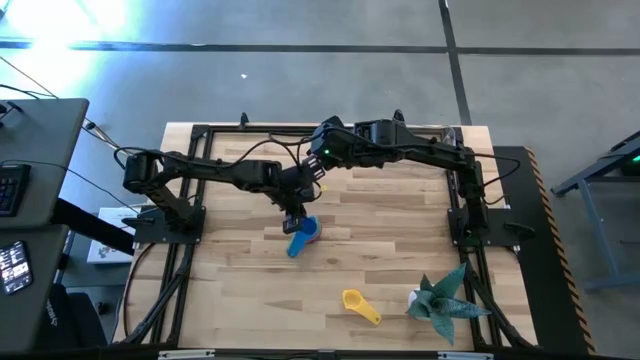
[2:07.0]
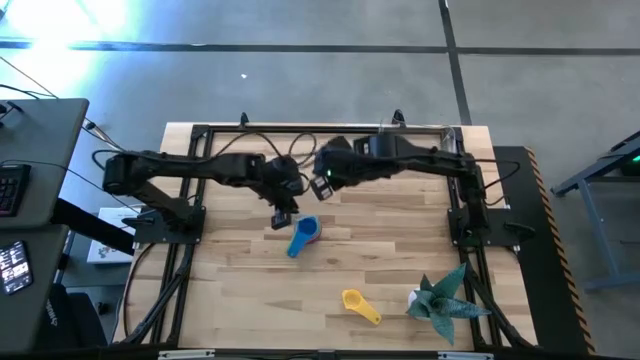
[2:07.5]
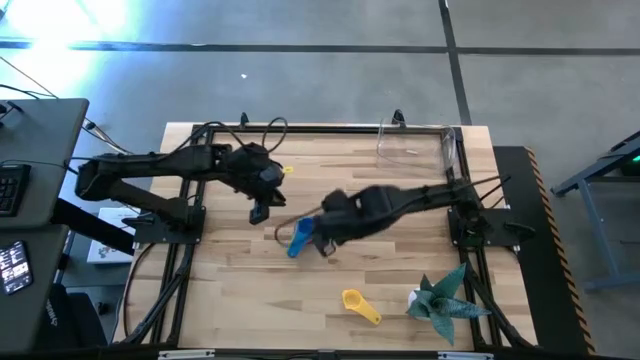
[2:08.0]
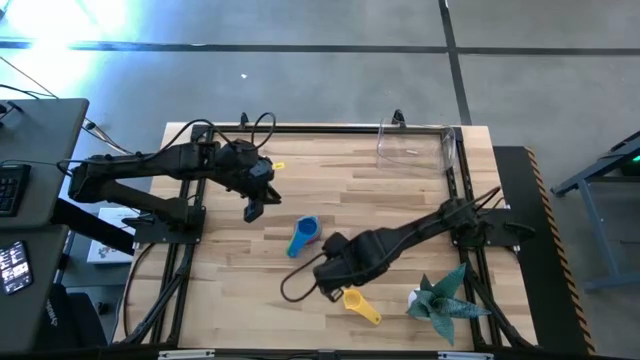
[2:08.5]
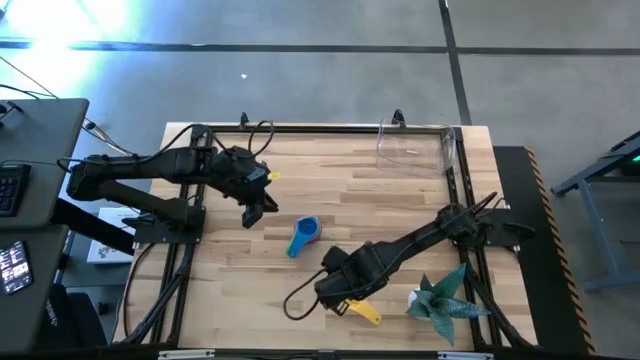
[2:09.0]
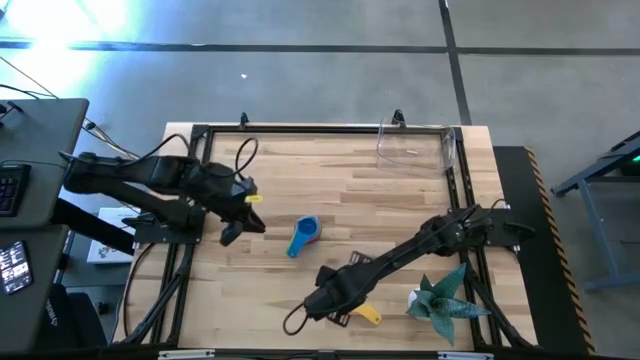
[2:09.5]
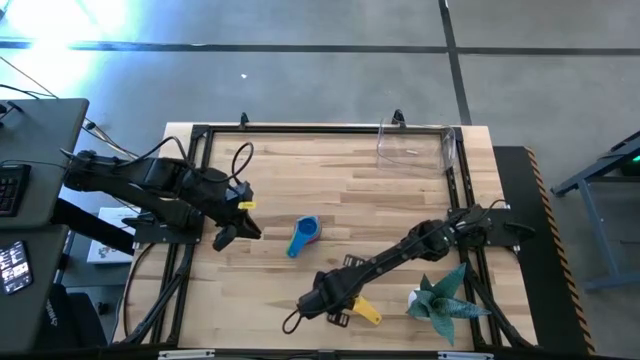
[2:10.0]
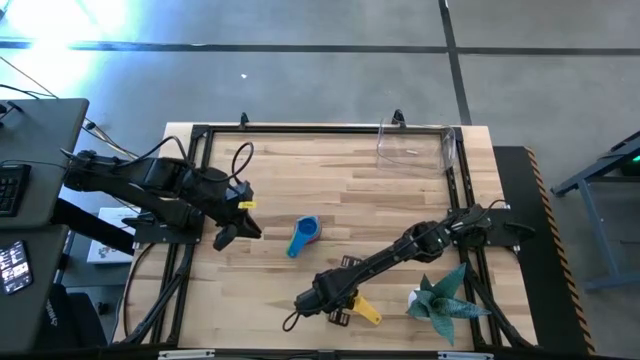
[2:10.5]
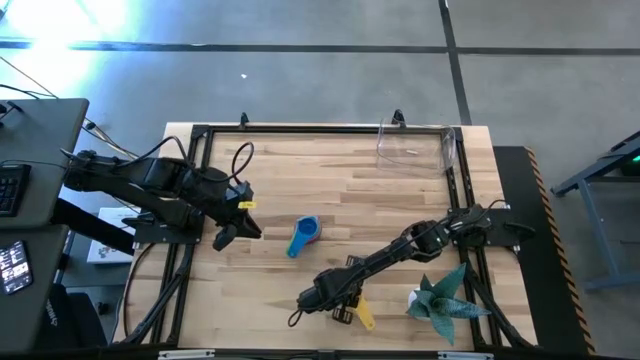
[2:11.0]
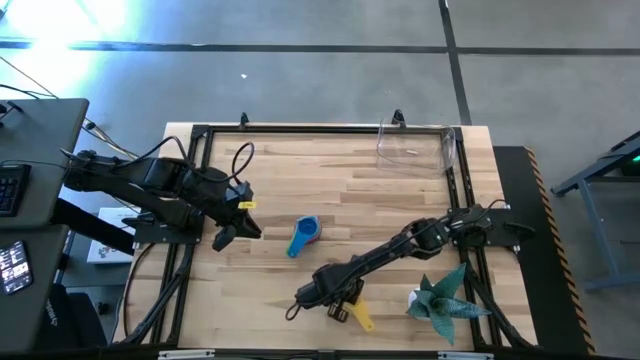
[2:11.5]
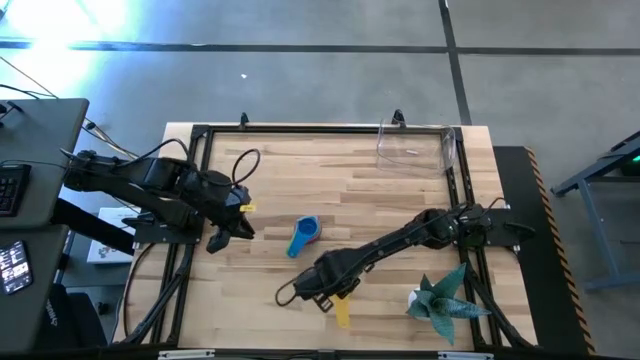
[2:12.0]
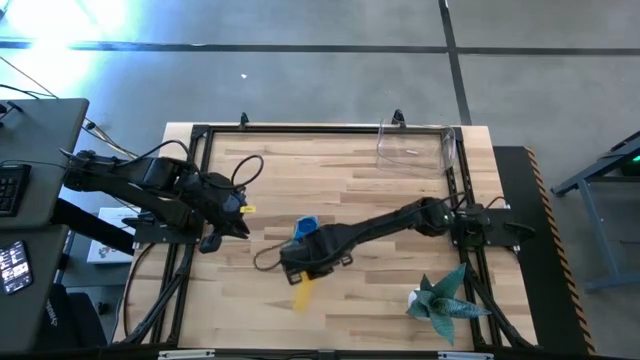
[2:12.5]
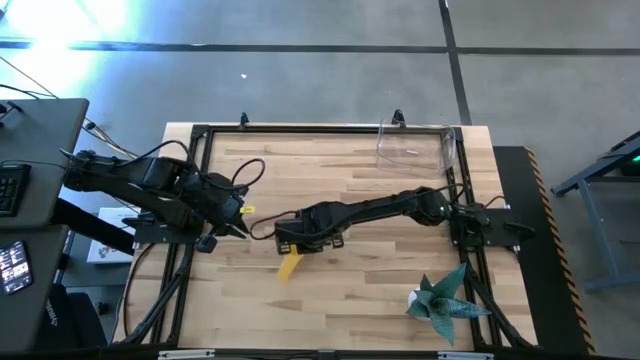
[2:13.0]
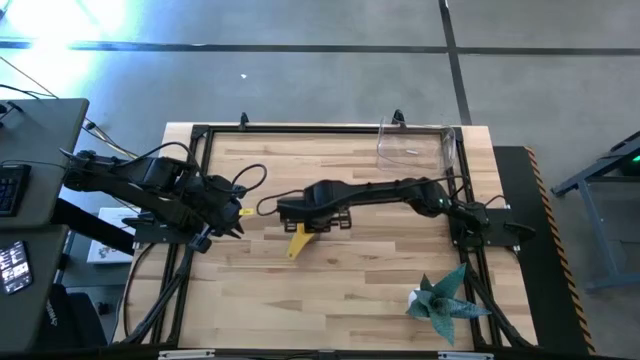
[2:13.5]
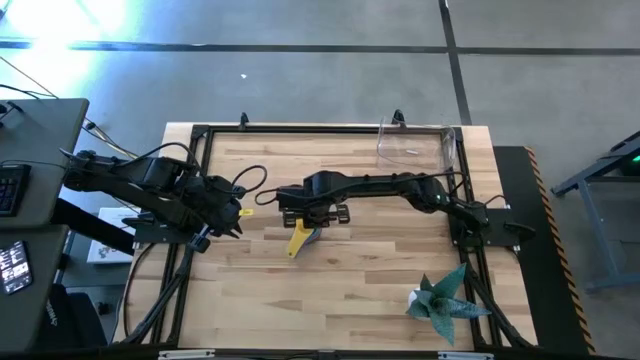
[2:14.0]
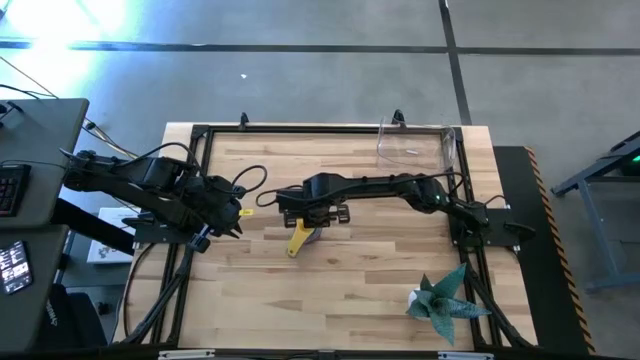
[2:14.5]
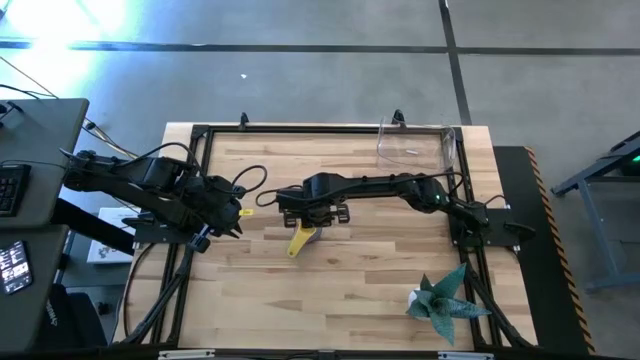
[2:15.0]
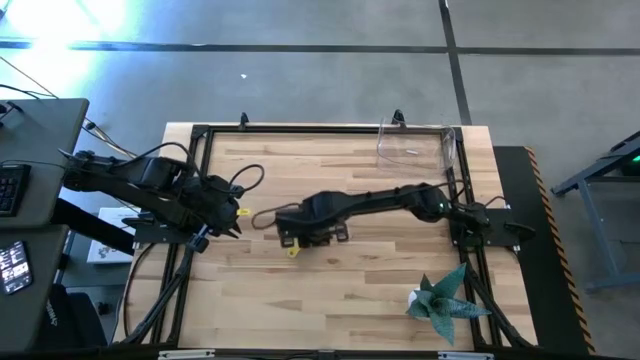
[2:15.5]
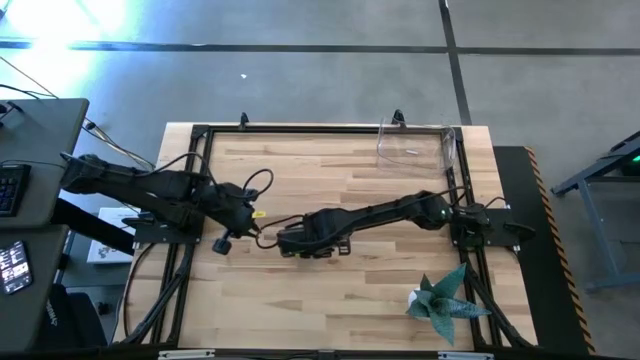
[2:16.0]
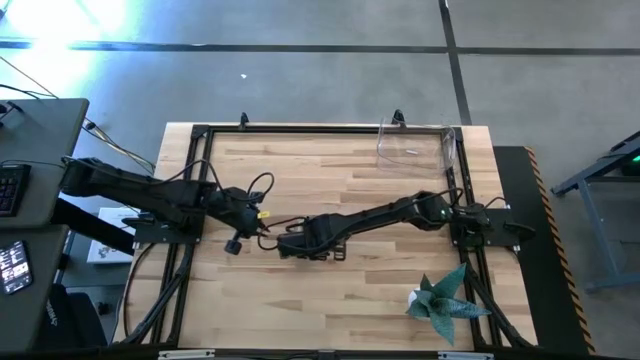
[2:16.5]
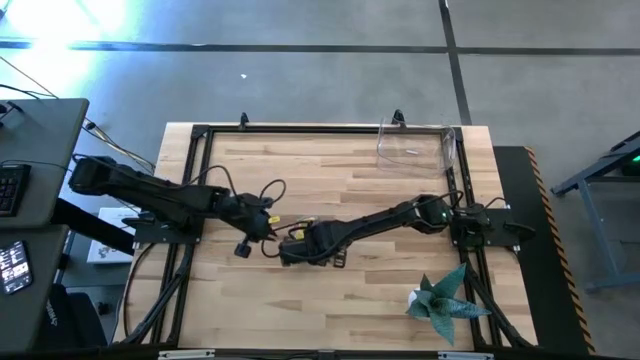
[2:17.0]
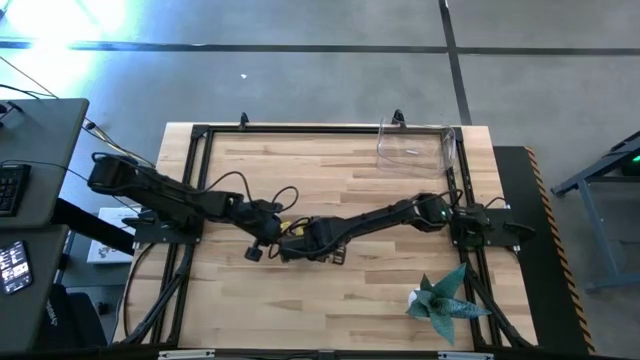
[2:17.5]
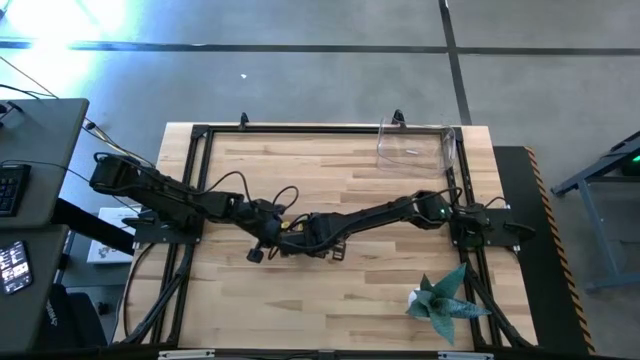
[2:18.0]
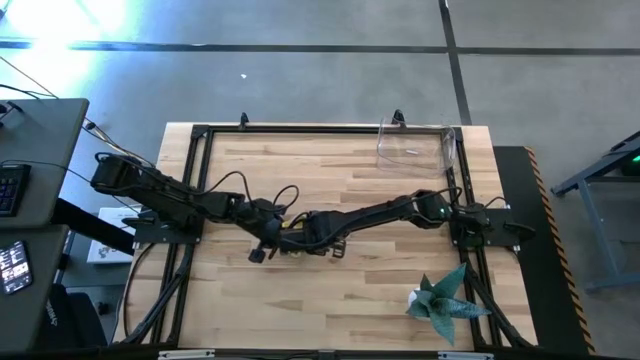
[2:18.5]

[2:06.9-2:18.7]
Task: Nest measuring cups in basket
Stack the yellow measuring cup on top of the blue measuring cup

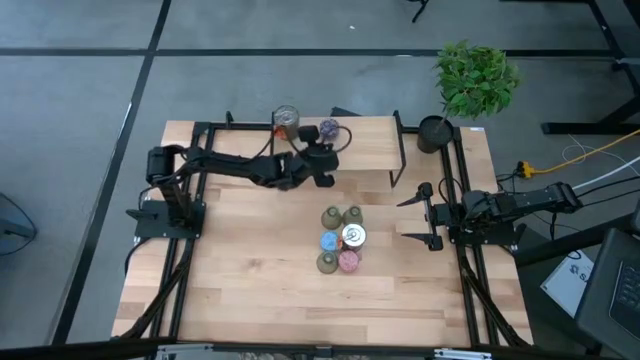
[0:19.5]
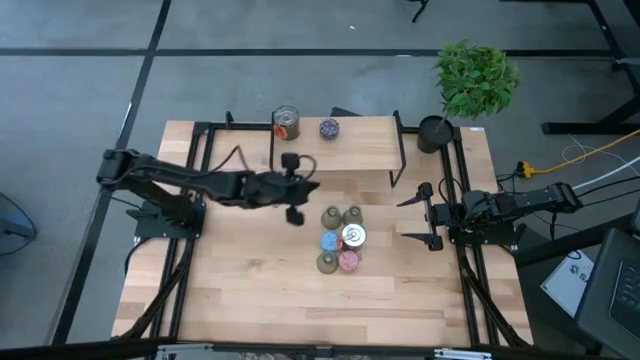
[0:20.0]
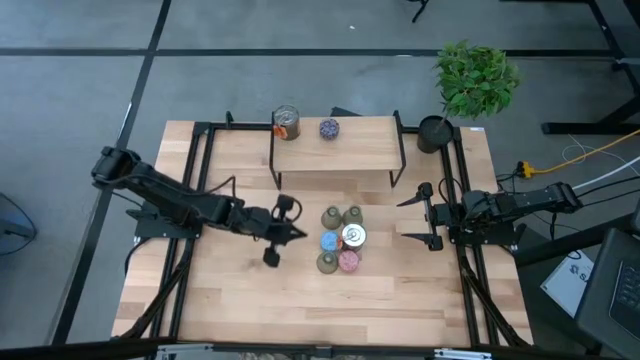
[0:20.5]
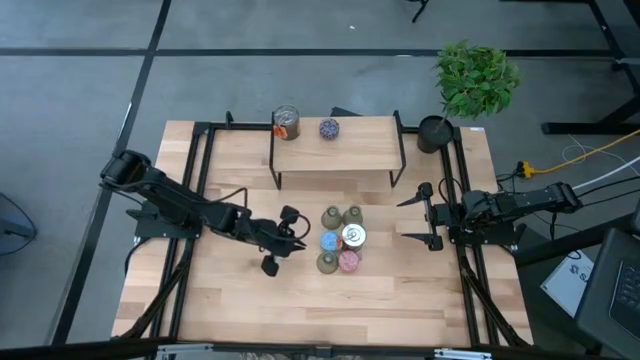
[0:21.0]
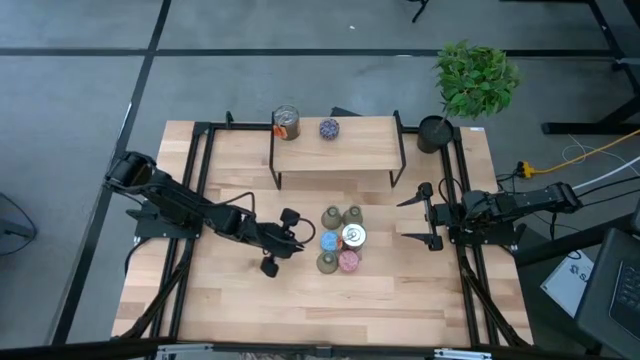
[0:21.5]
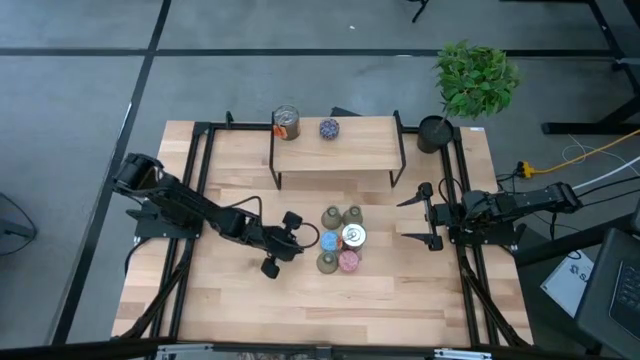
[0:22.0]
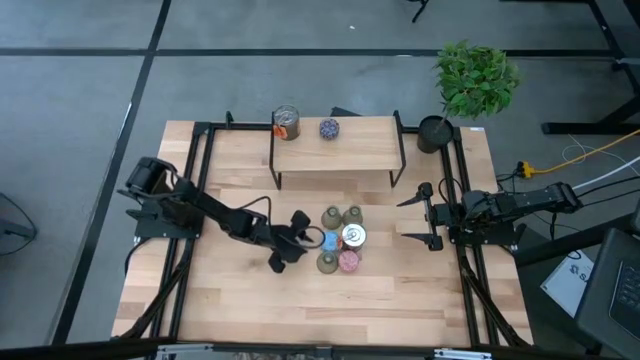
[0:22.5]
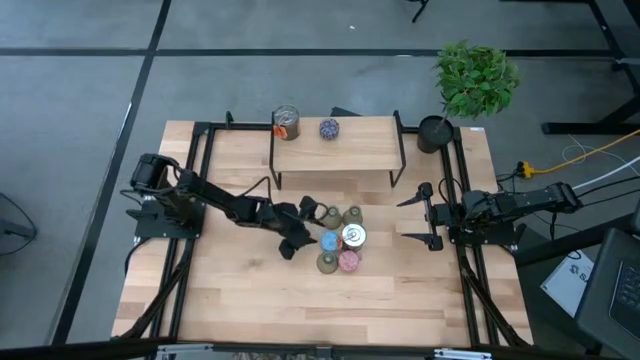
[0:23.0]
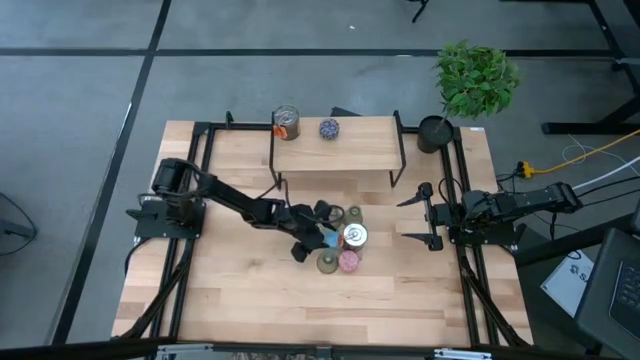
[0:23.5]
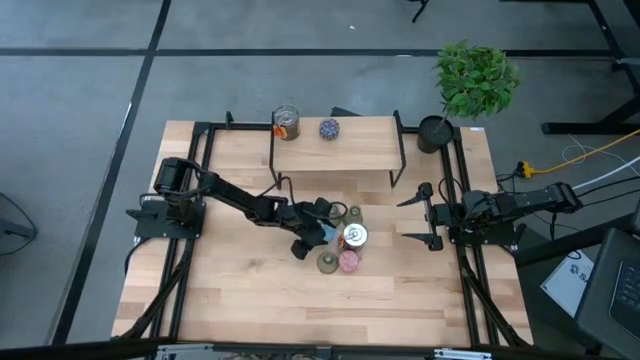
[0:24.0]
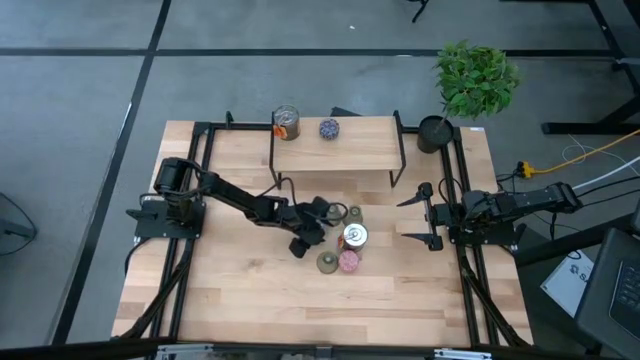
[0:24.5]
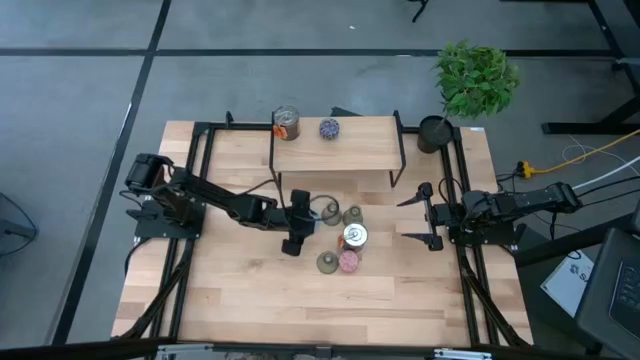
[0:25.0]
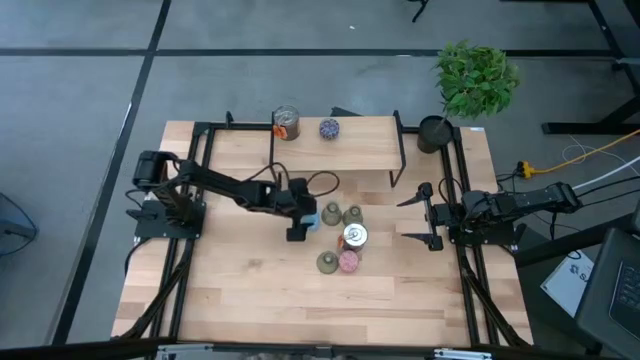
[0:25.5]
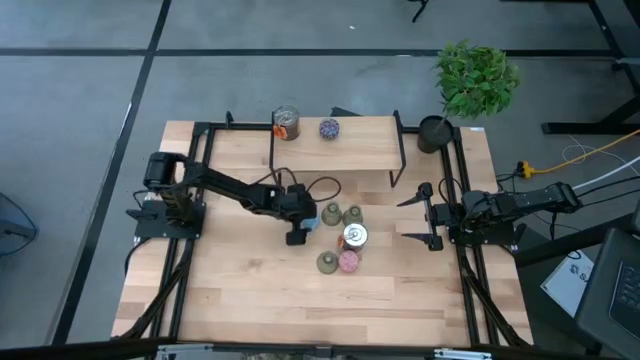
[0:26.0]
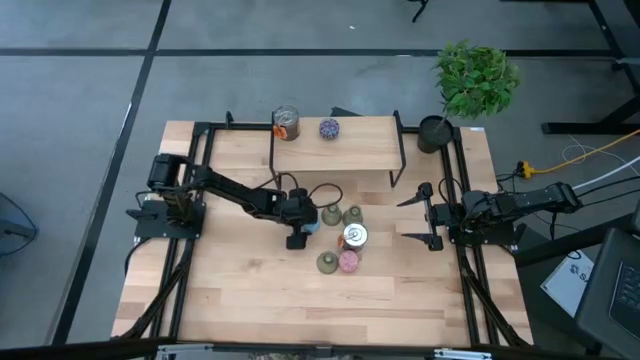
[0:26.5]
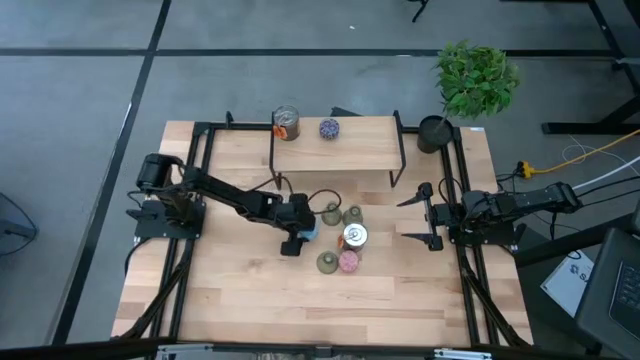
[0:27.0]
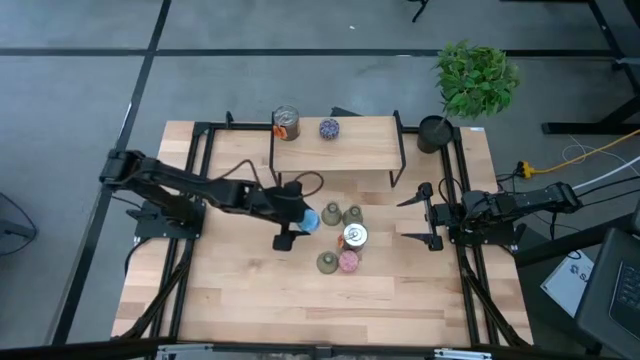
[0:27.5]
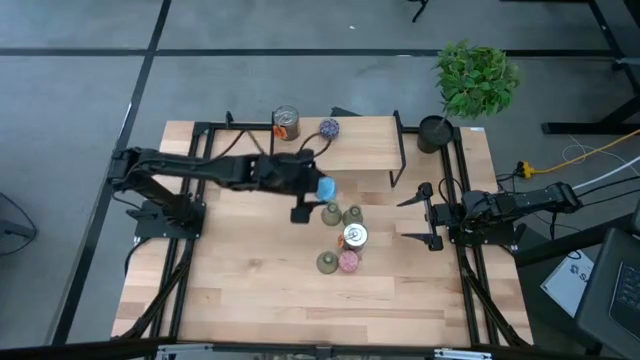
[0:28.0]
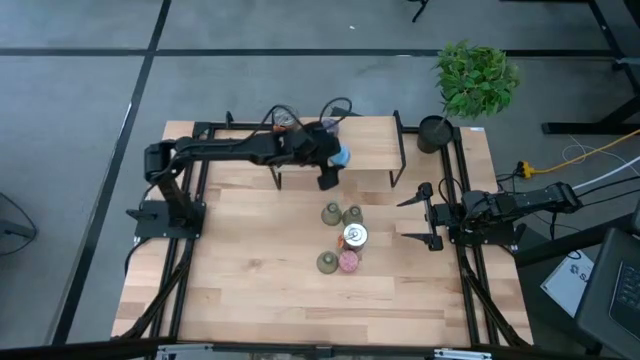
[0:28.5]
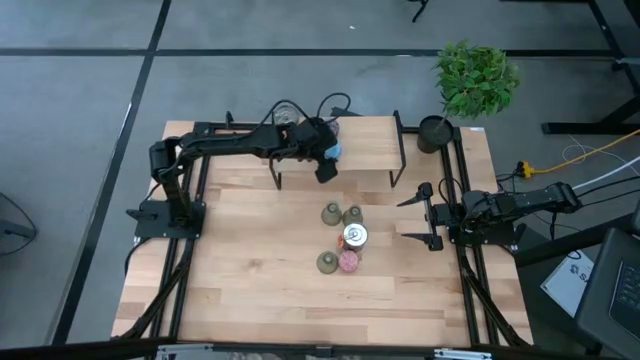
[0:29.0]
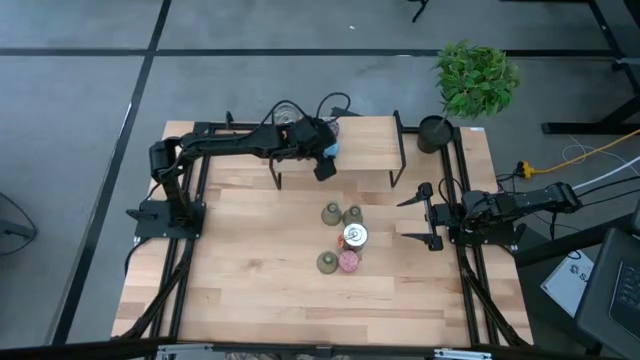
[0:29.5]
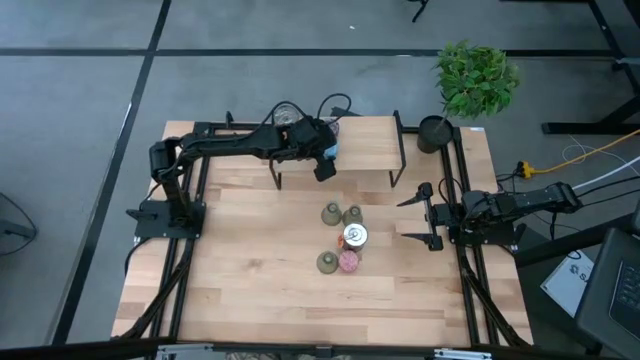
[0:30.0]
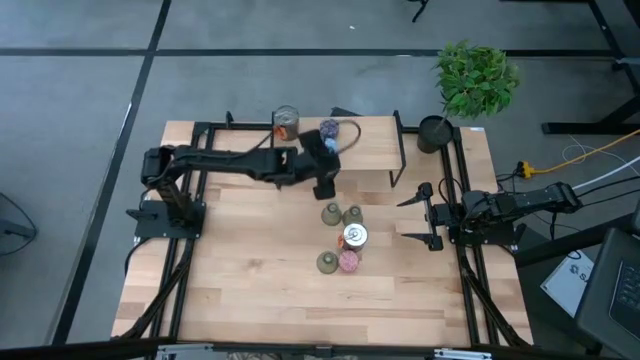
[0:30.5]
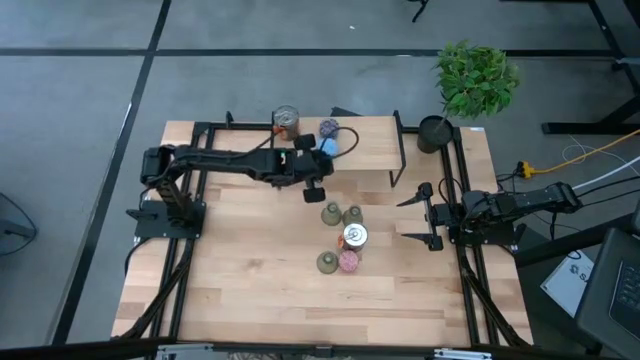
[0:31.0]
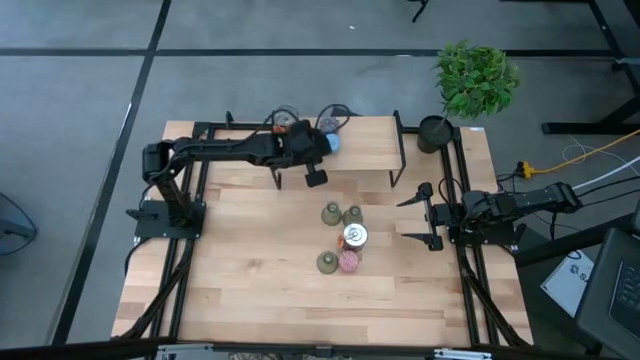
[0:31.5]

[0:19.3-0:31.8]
Task: Pick & Place candle stick holders
Put the blue scented candle on the shelf aligned with the other scented candle
